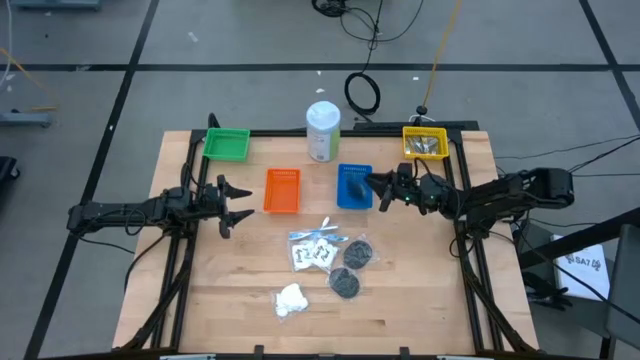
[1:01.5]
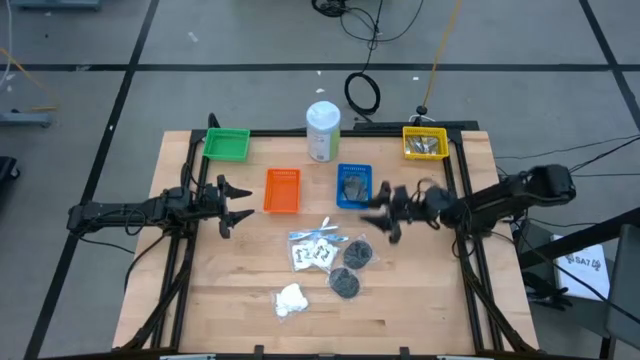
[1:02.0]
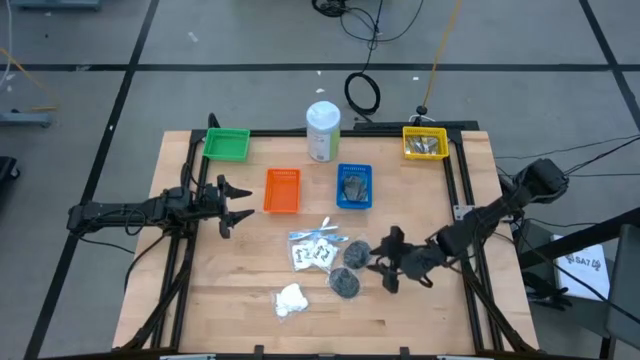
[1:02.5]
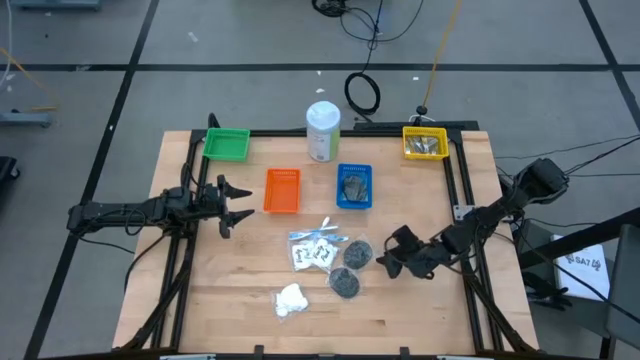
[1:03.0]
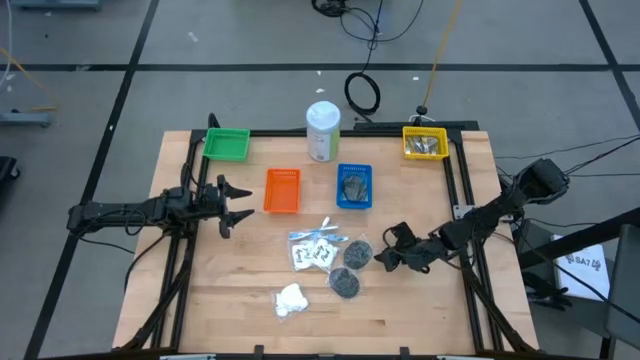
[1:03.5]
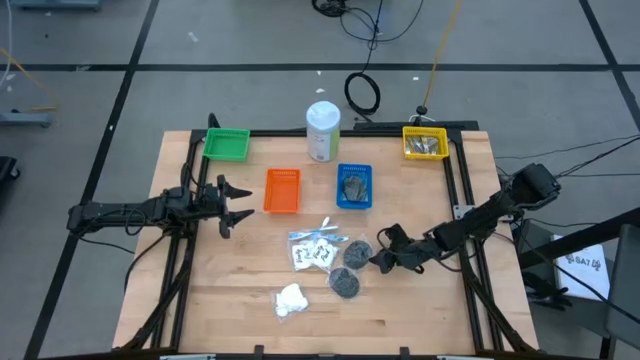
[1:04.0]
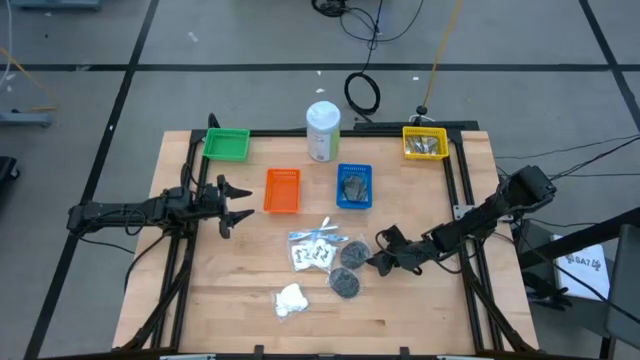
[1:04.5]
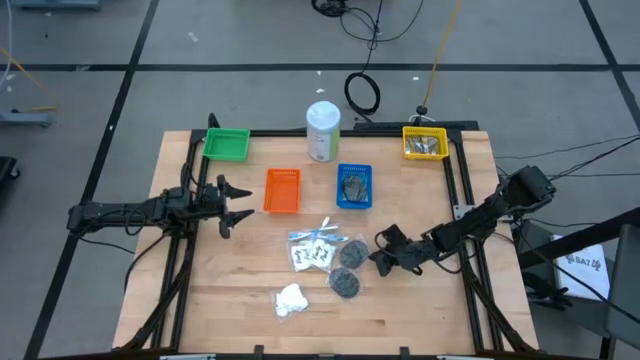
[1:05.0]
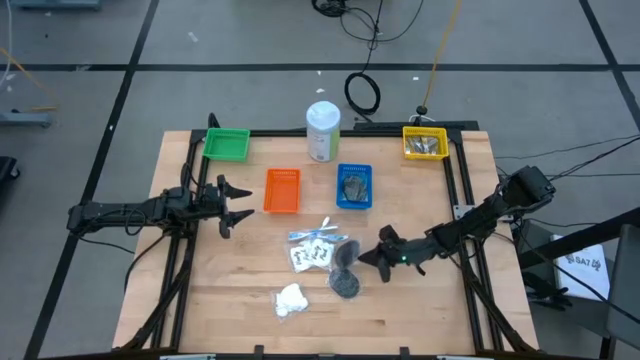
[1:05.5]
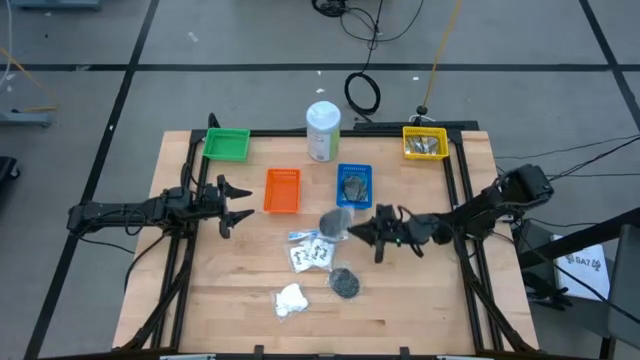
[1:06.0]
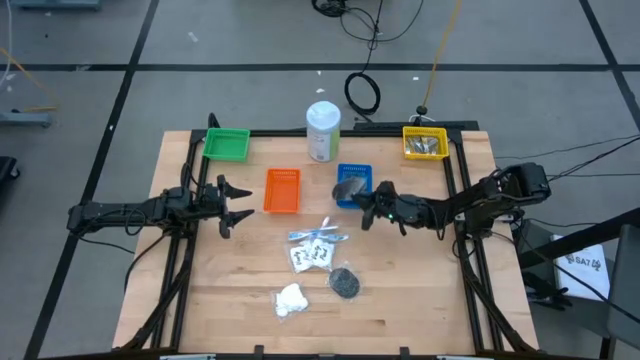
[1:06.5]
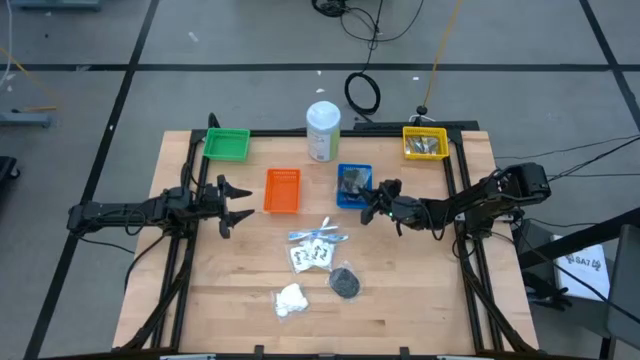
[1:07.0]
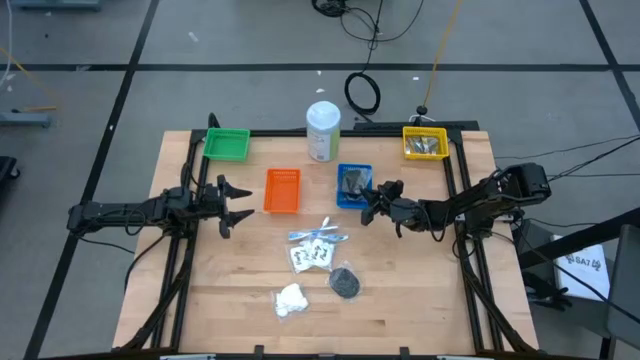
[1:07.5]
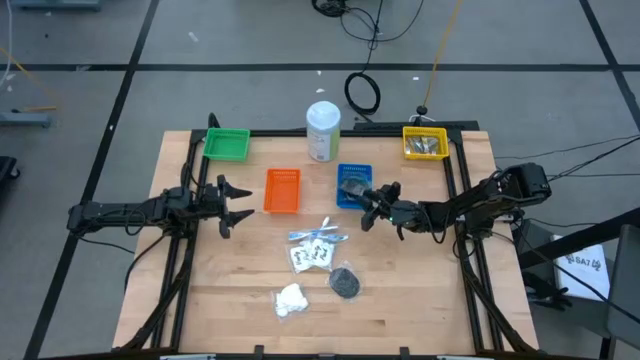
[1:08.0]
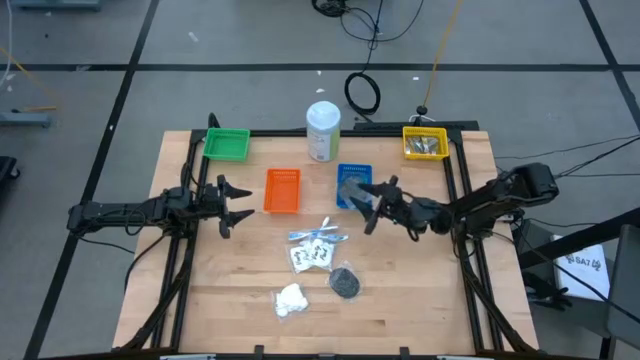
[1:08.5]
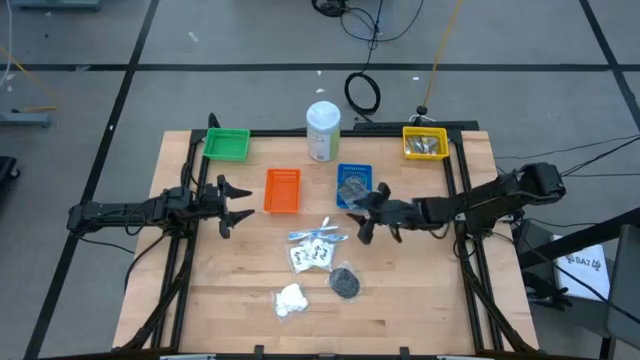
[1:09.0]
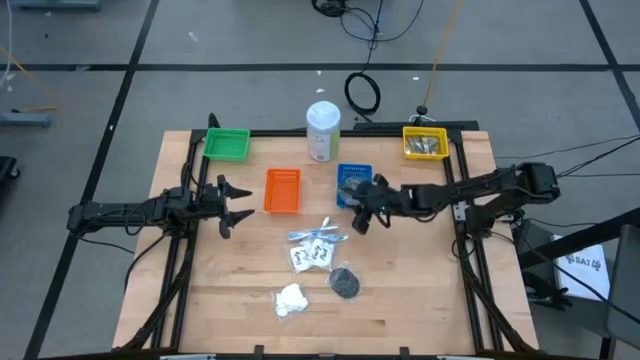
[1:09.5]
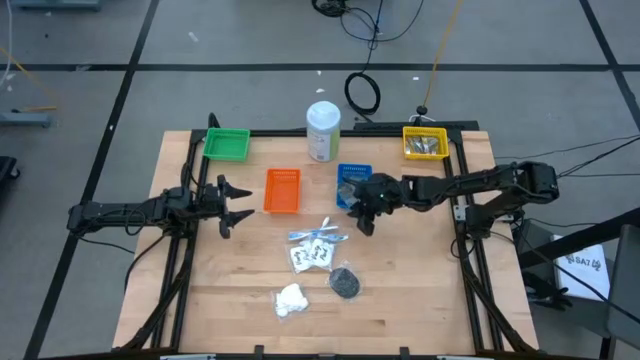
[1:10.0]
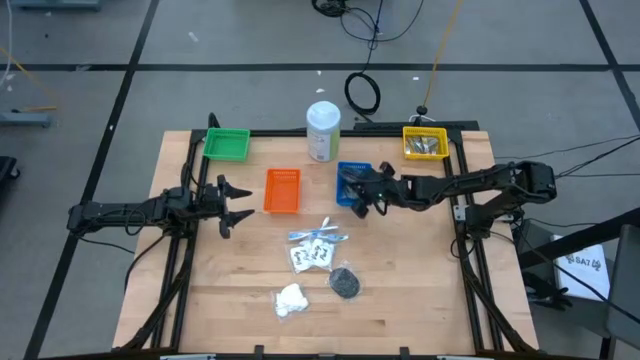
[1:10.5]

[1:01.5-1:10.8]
Task: Pick & Place Travel size toiletries
Put the top hairbrush into the blue bin

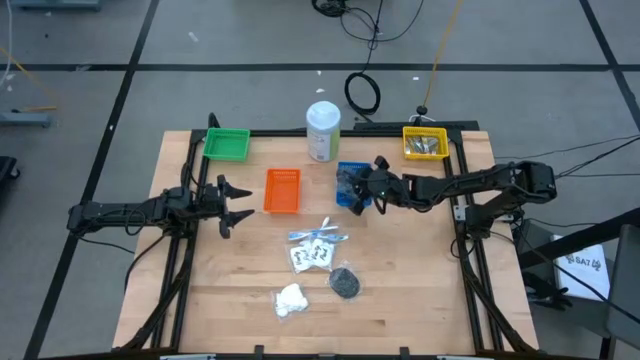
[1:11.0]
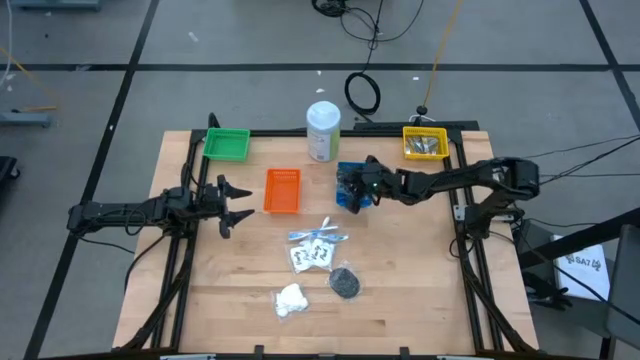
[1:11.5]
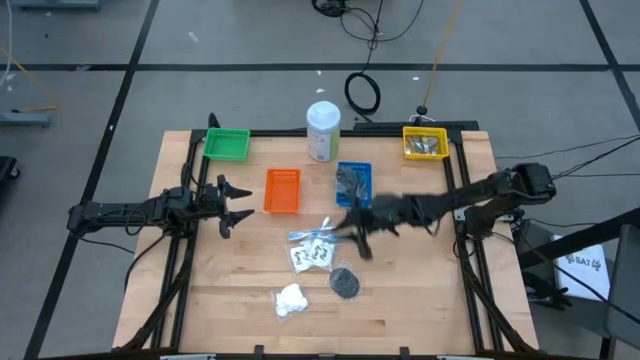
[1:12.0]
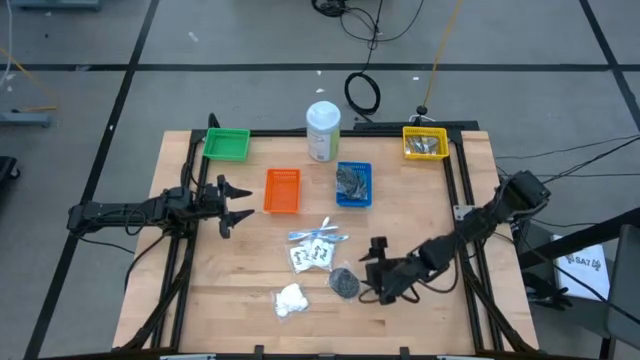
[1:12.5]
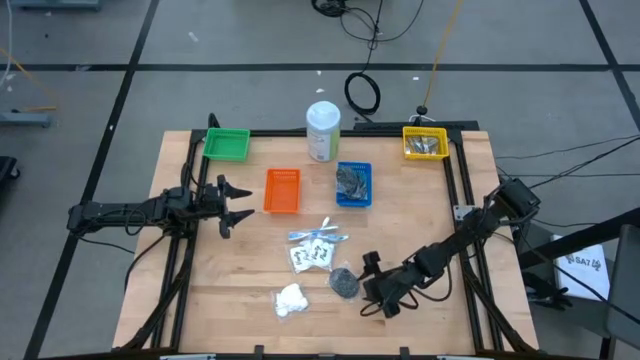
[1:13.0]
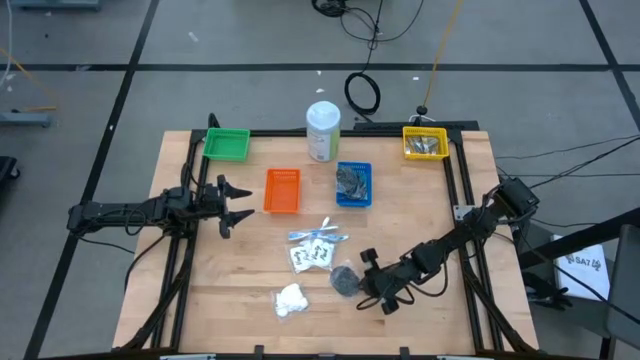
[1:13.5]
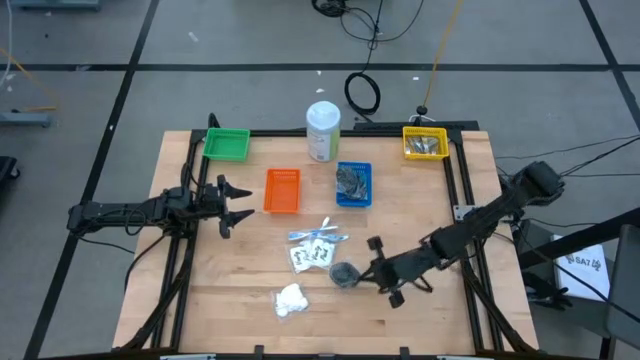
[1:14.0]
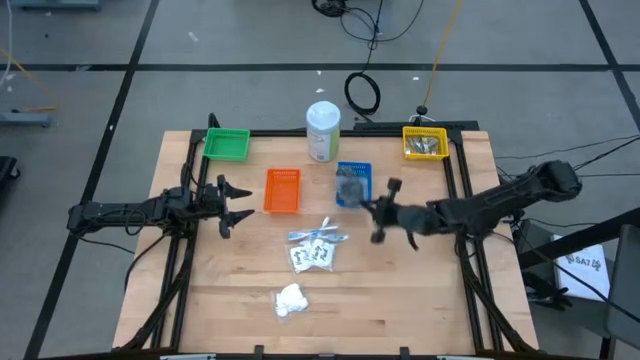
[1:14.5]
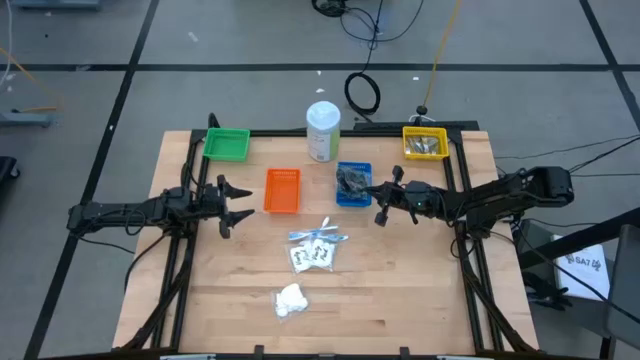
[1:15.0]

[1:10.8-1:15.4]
Put the hairbrush into the blue bin

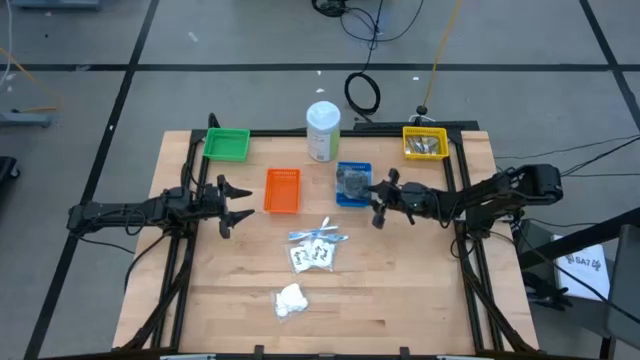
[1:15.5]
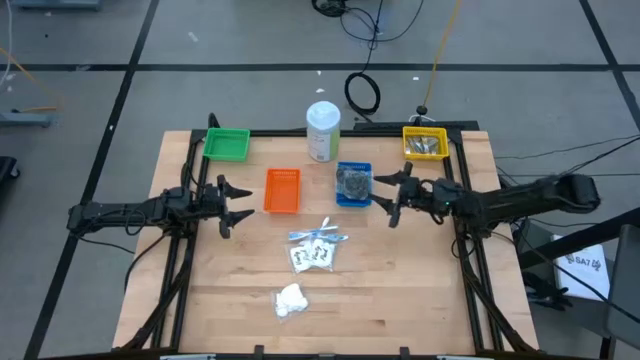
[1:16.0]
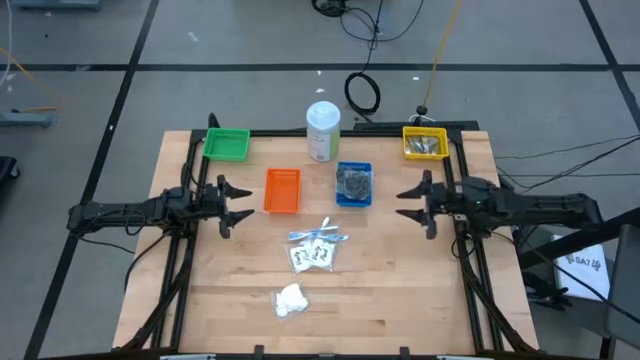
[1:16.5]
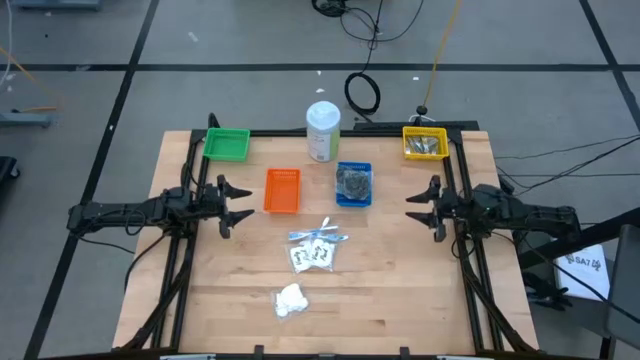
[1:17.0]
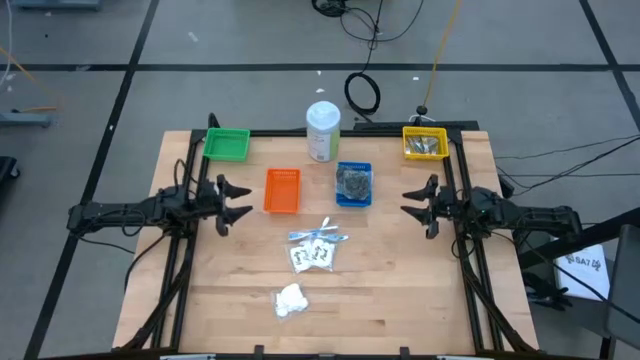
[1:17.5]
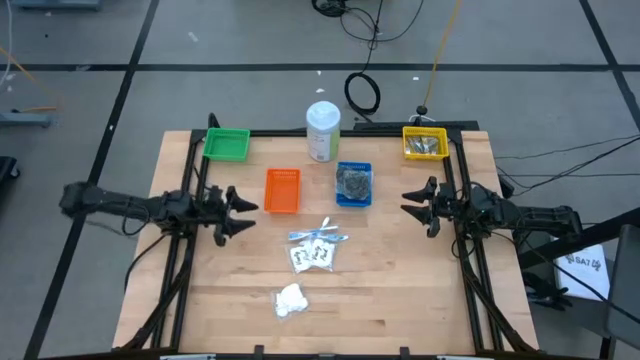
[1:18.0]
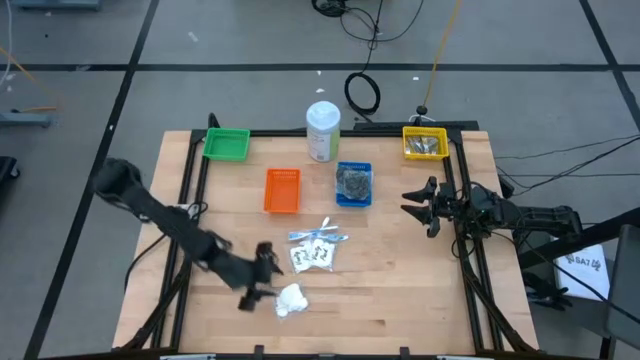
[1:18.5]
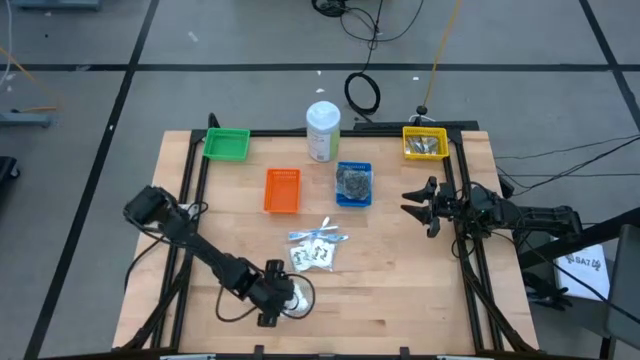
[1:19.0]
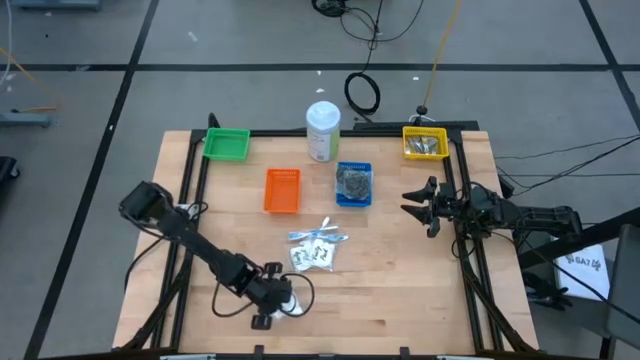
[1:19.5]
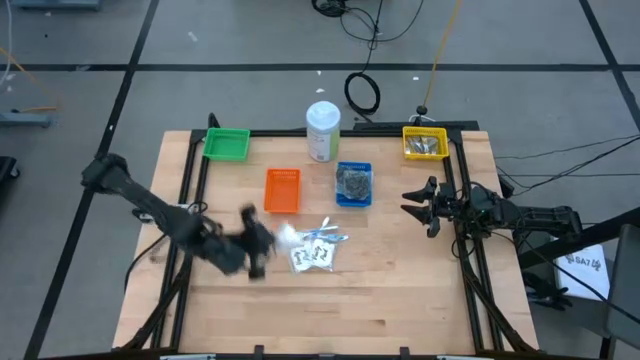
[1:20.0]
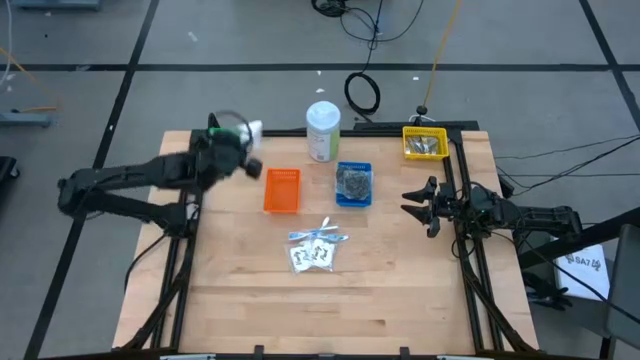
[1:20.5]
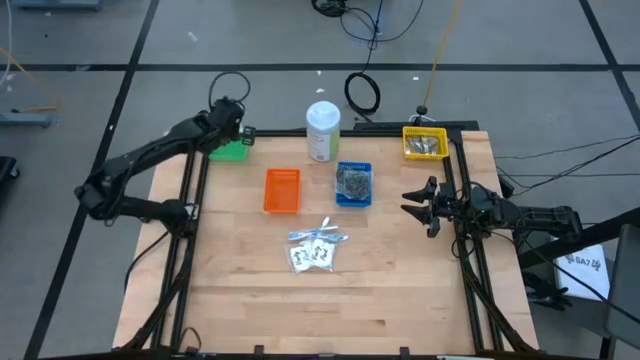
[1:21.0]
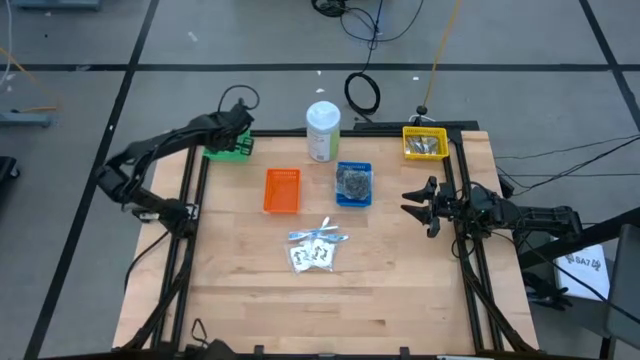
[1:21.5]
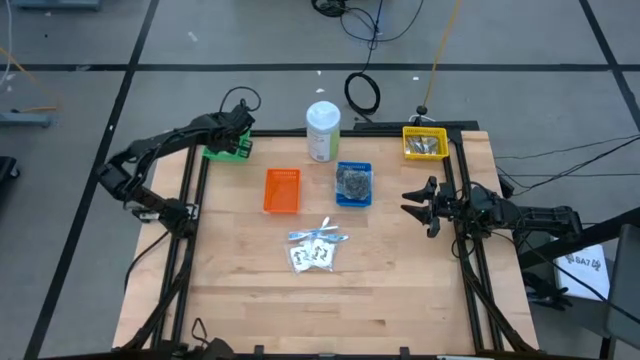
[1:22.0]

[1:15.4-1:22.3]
Put the bottom cotton pack into the green bin
